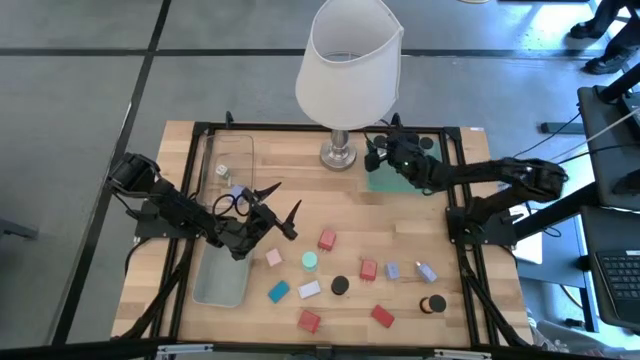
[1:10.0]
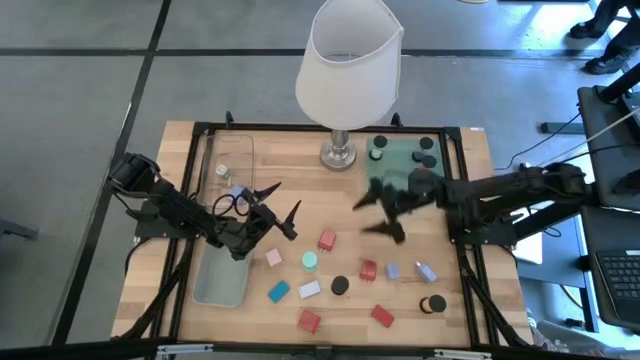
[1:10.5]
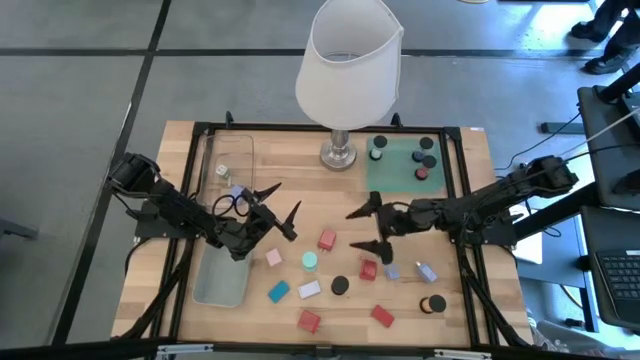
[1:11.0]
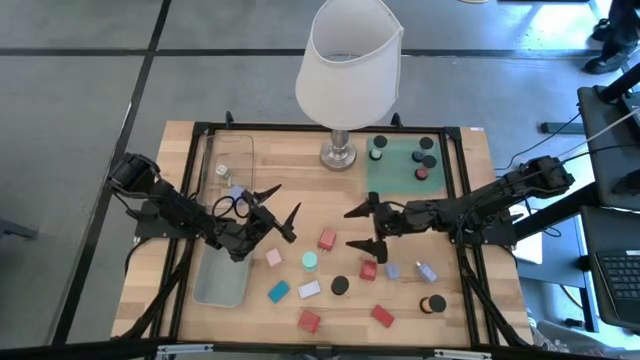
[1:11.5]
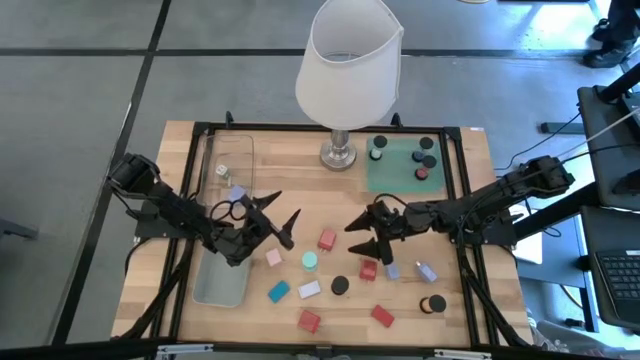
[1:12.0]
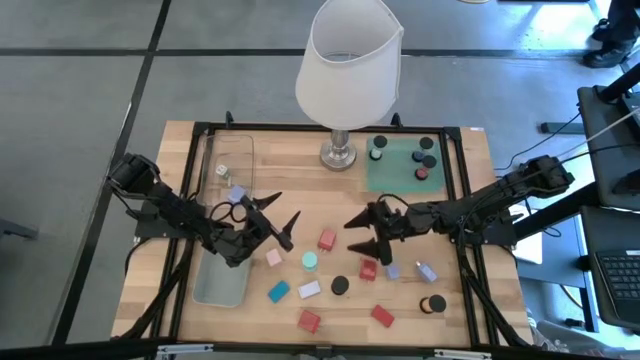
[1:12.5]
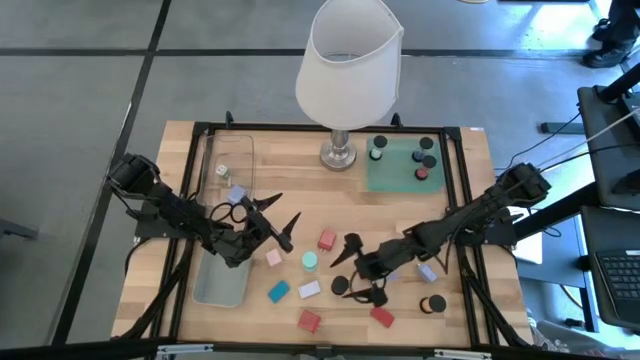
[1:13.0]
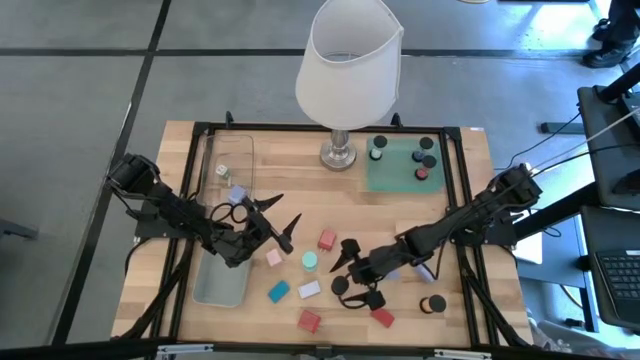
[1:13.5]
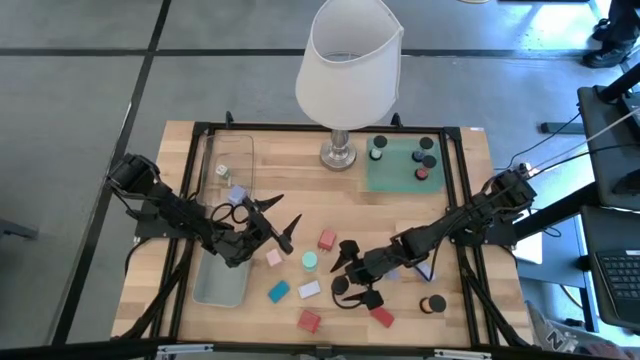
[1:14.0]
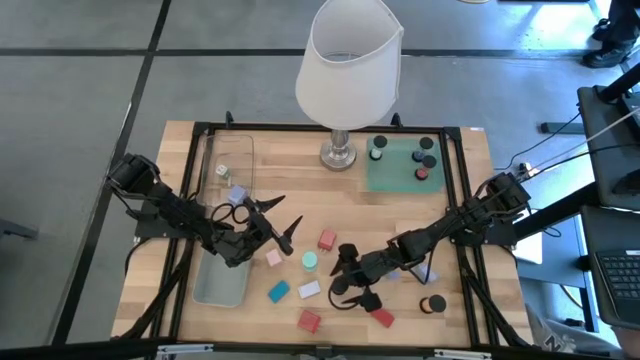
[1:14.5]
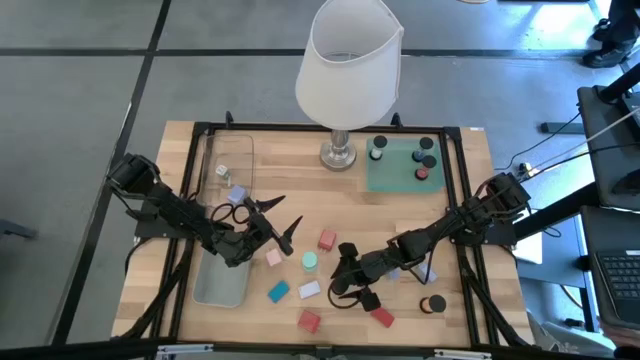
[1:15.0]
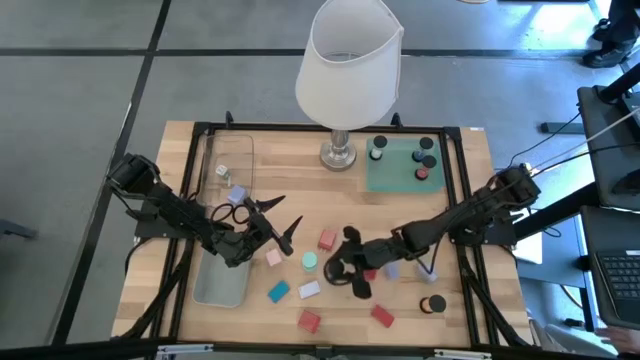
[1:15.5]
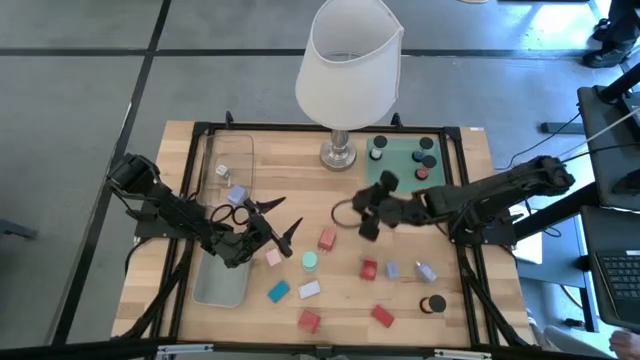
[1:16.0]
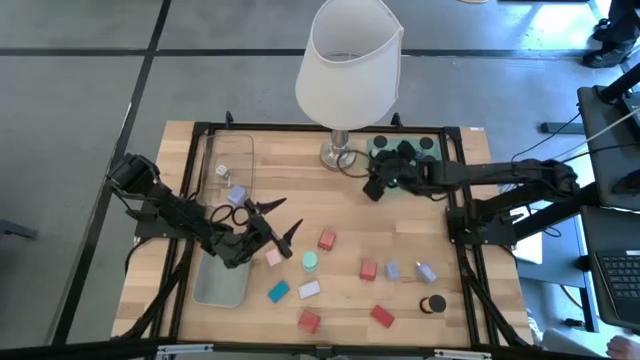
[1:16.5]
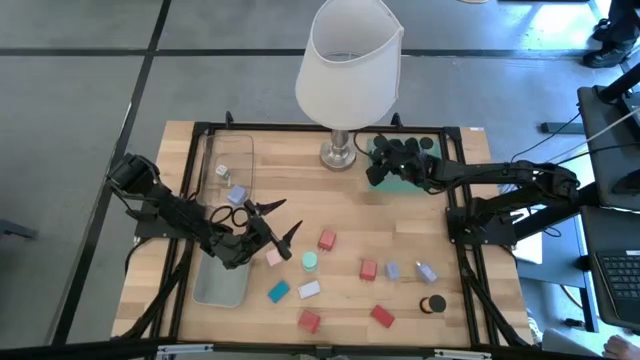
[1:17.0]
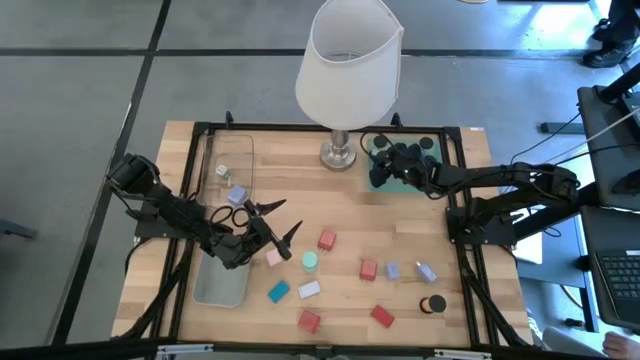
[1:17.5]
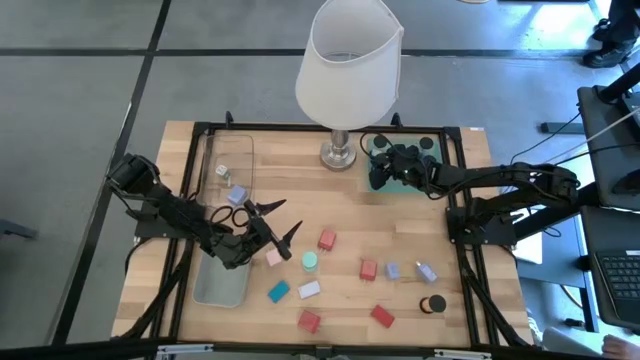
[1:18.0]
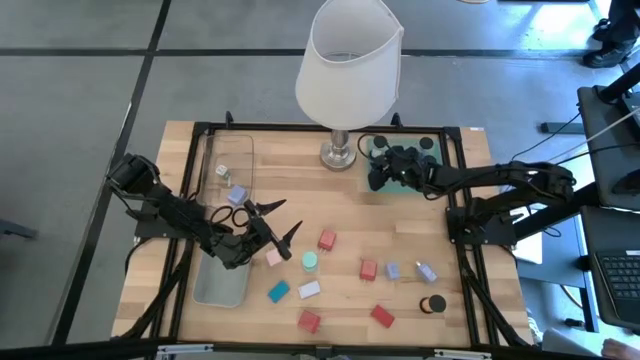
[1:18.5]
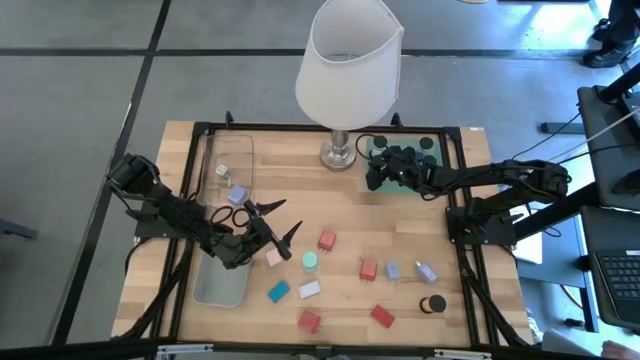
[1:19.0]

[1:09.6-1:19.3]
Task: Pick & Place Office items
Put the blue hourglass into the green bin

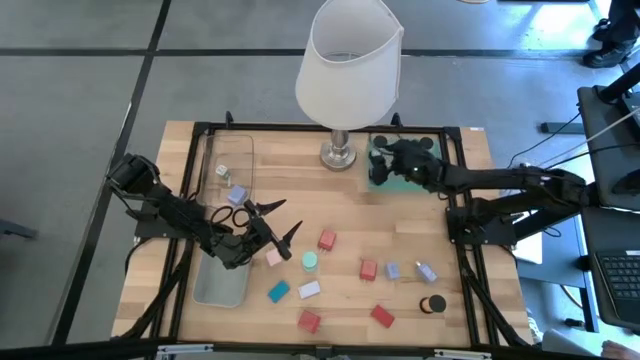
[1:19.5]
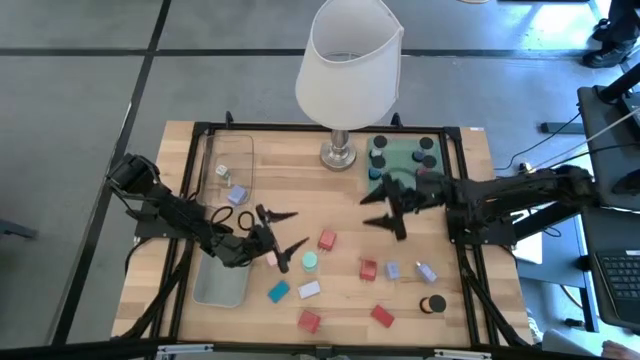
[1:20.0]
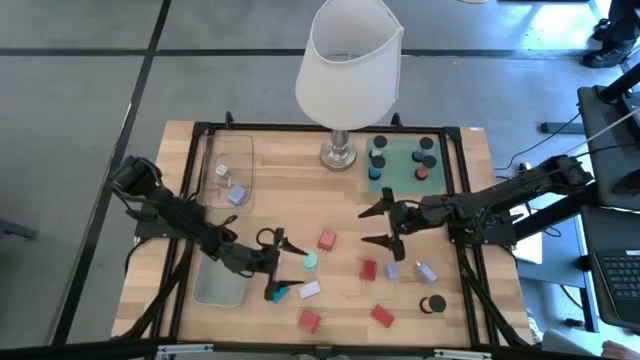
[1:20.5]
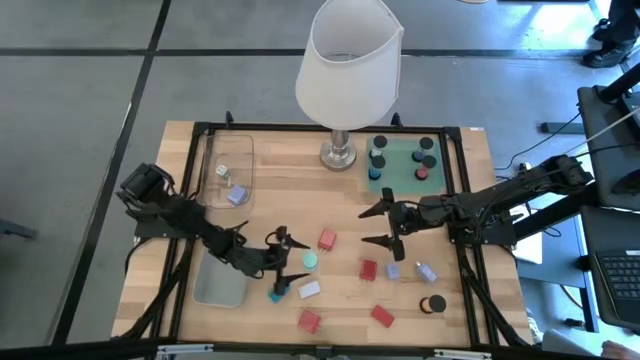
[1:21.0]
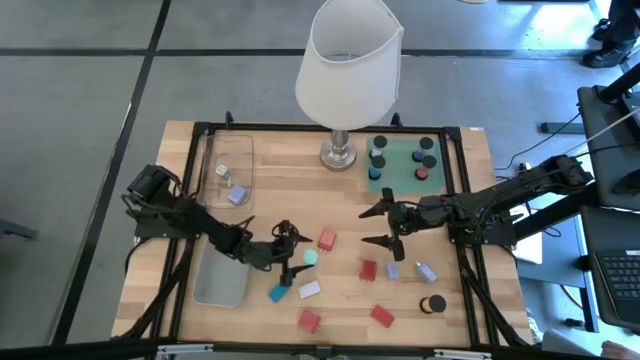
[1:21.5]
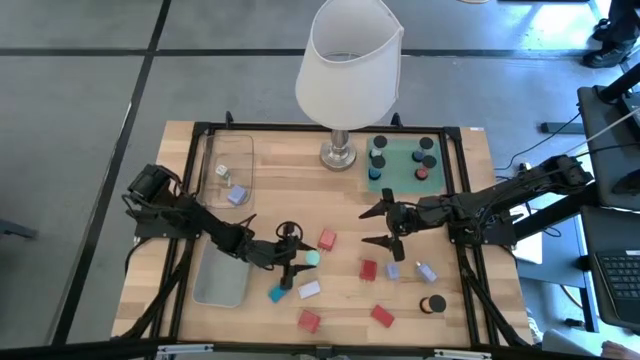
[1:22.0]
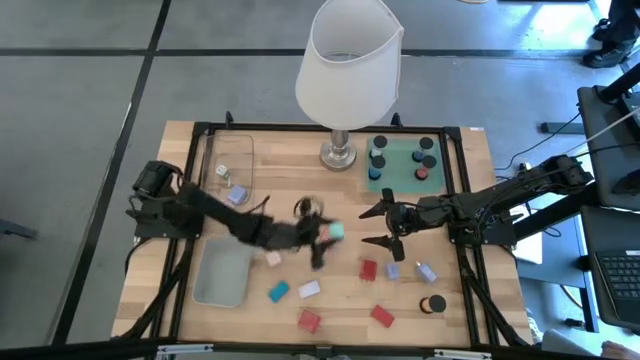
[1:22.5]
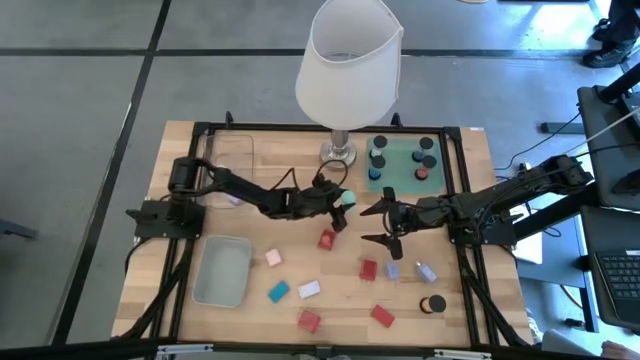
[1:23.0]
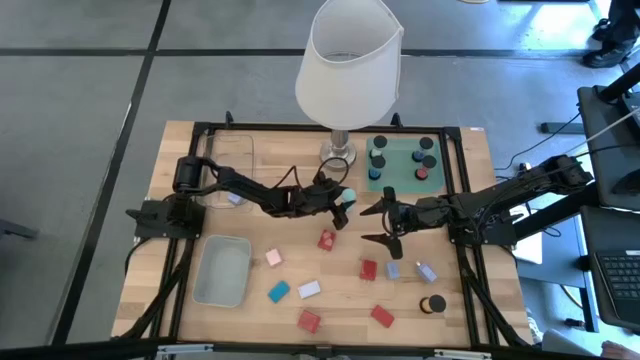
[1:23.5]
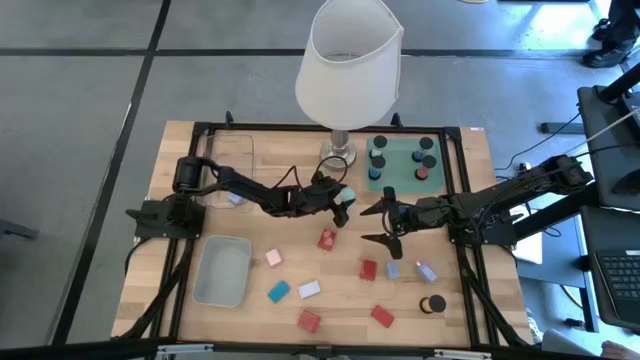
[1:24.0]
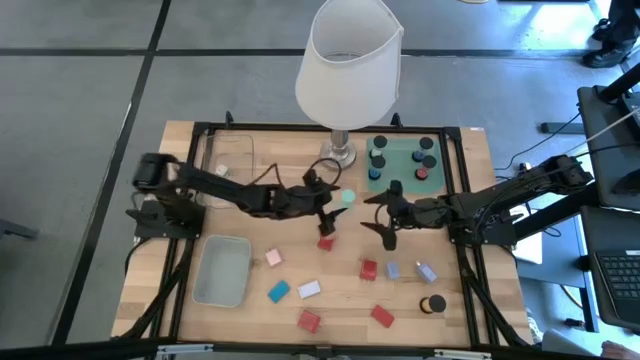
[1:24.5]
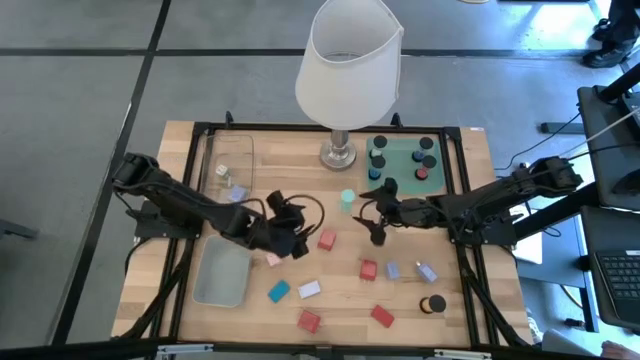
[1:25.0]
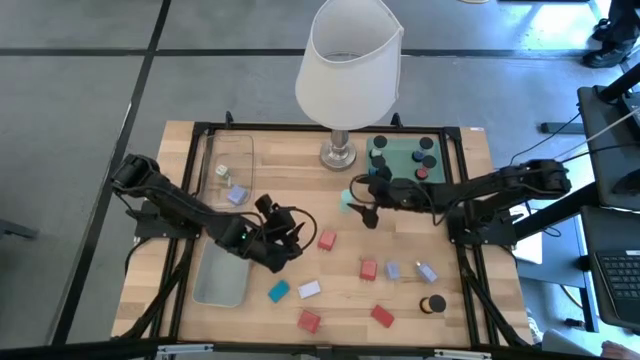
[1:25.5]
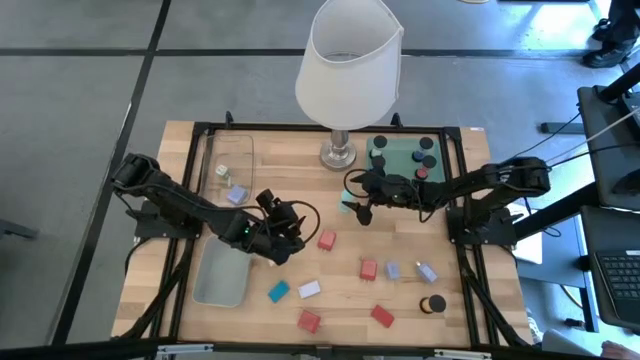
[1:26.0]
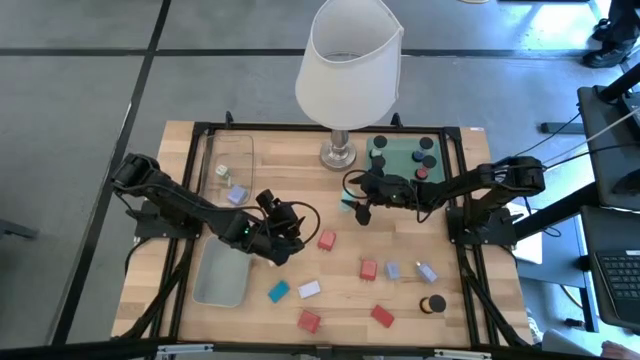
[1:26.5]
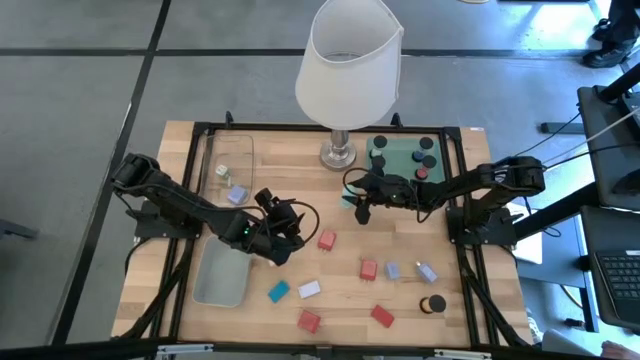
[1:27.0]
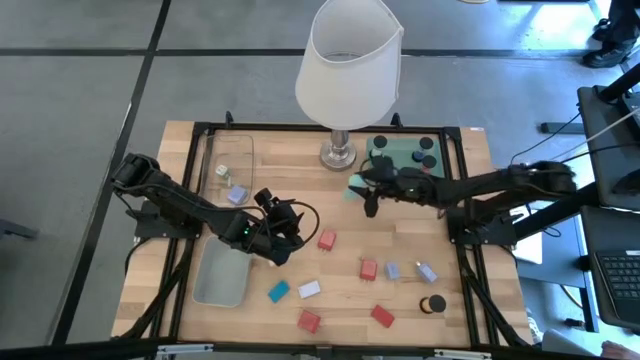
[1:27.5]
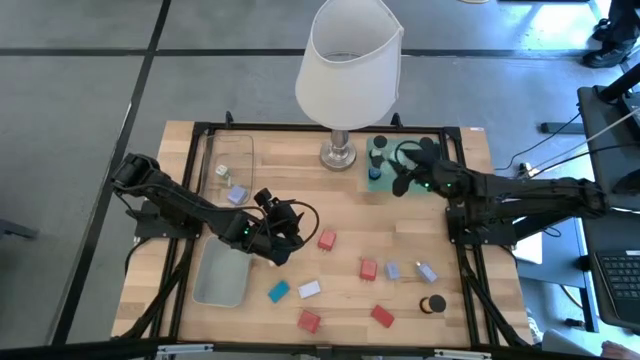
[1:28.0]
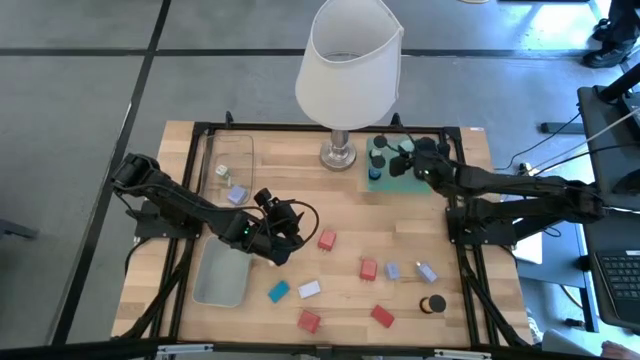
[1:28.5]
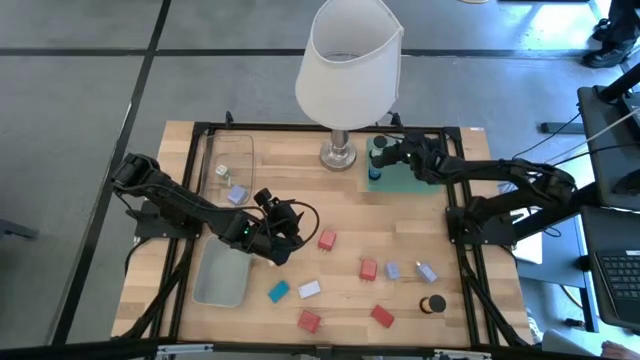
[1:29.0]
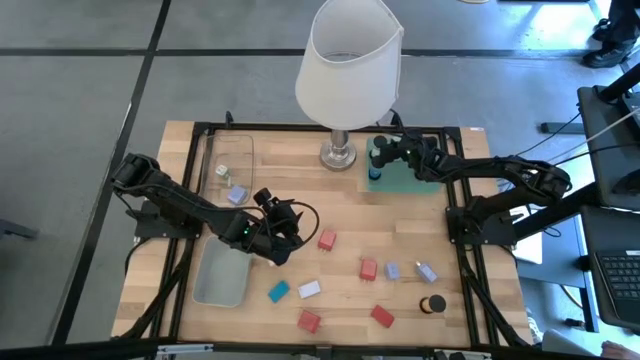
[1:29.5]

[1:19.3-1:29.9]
Put the light blue hour glass into the green bin

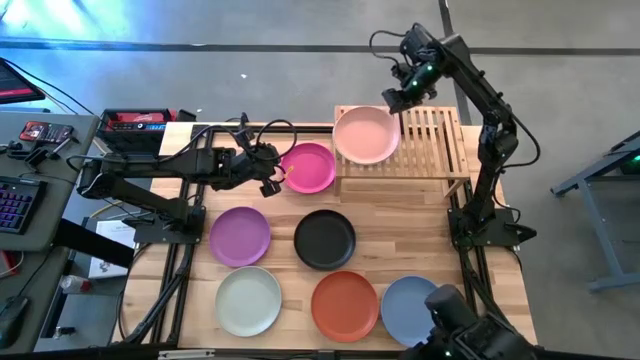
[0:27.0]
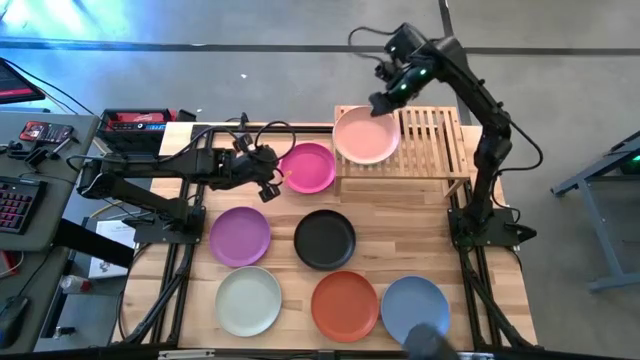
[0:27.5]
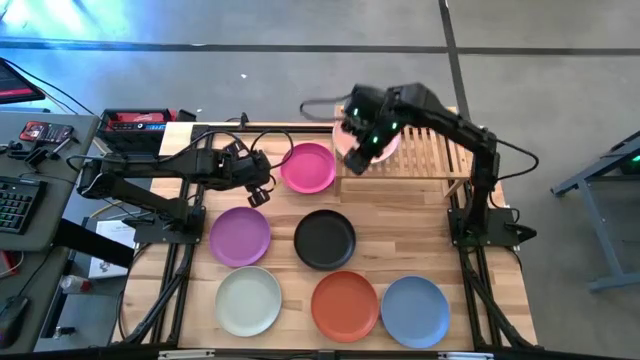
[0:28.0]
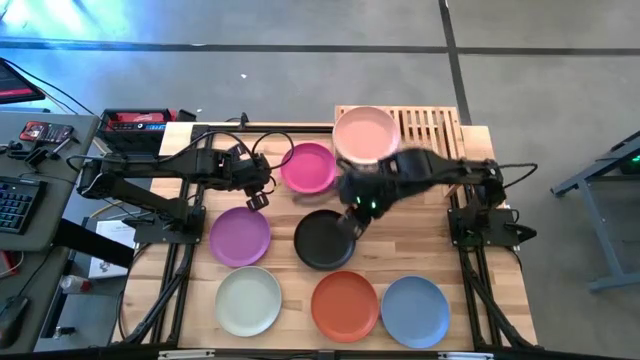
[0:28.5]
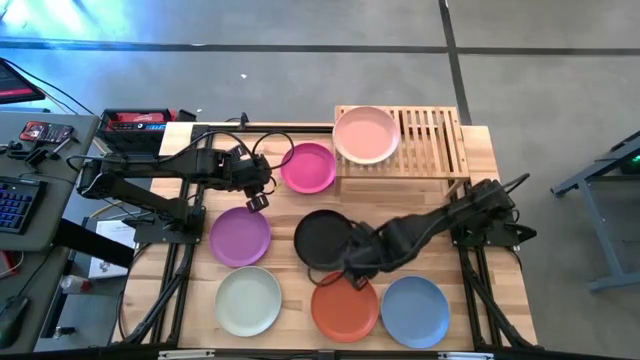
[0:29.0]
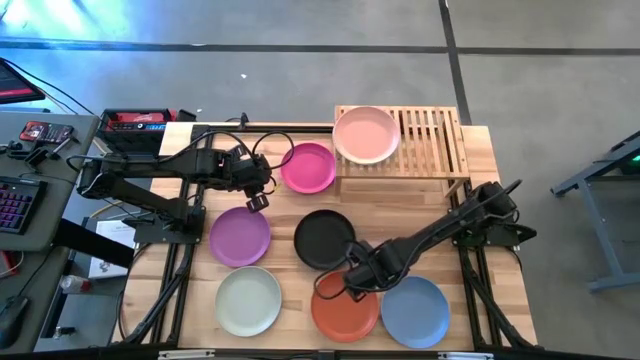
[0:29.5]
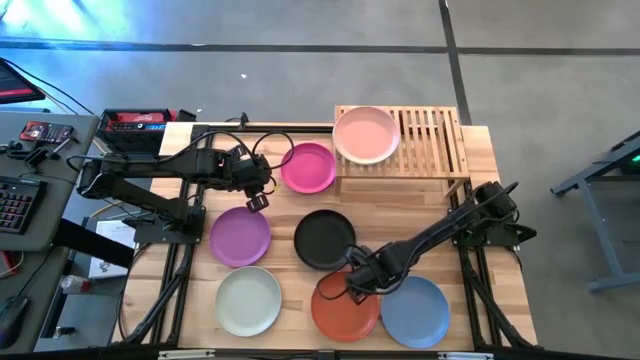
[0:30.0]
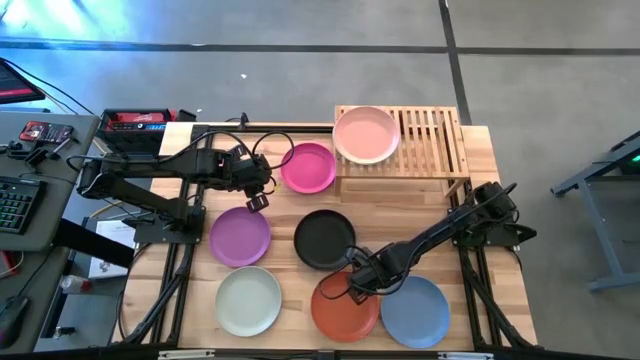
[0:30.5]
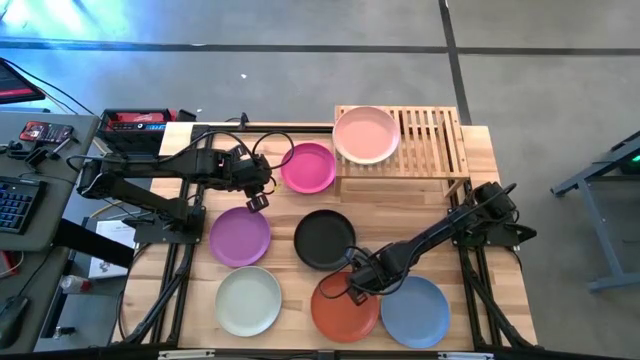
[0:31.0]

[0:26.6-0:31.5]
Task: Place and stack plates onto a shelf
Stack the orange plate on the light pink plate
